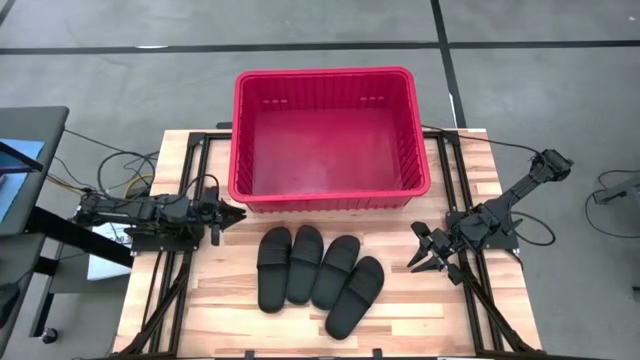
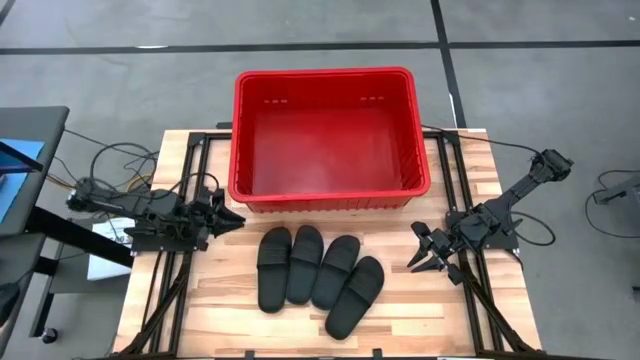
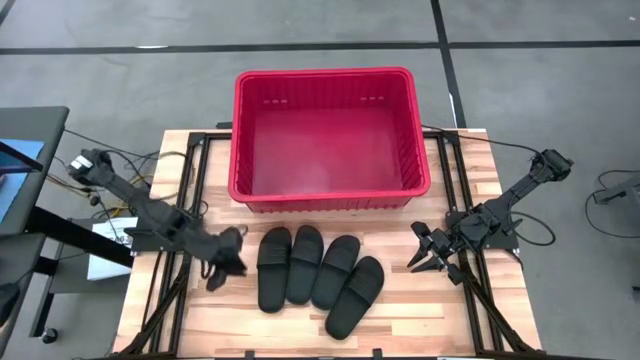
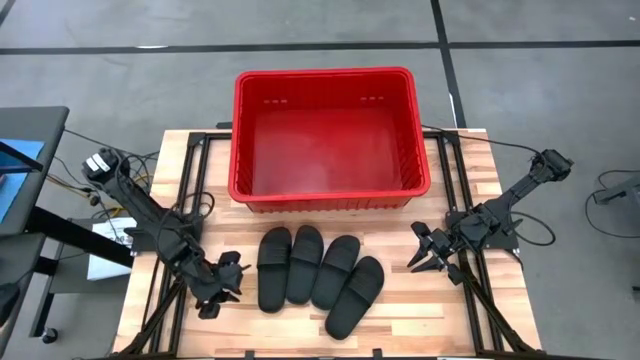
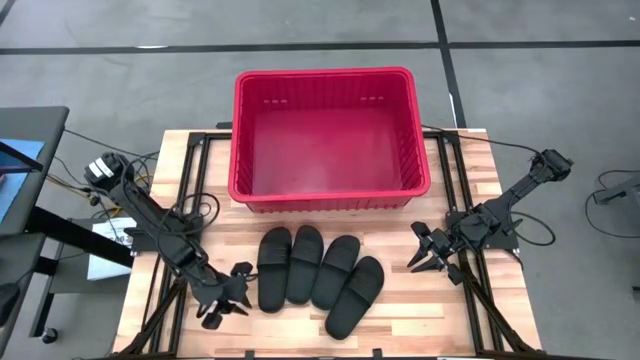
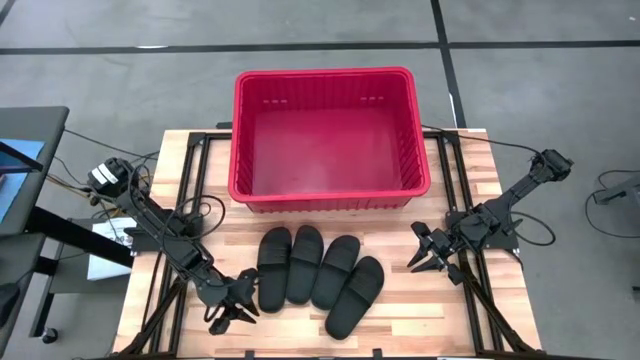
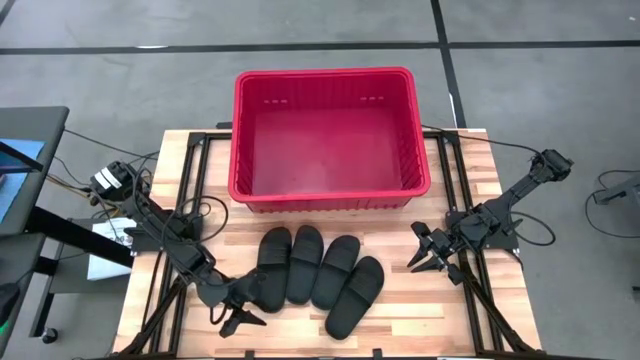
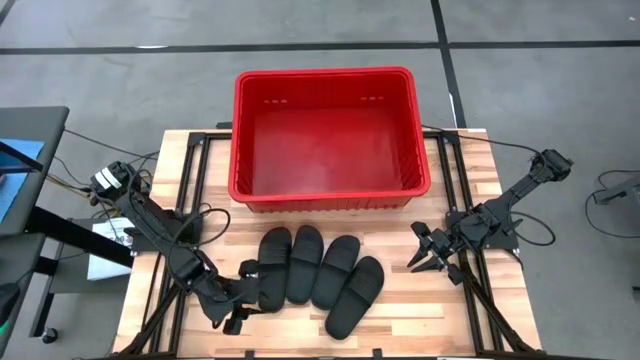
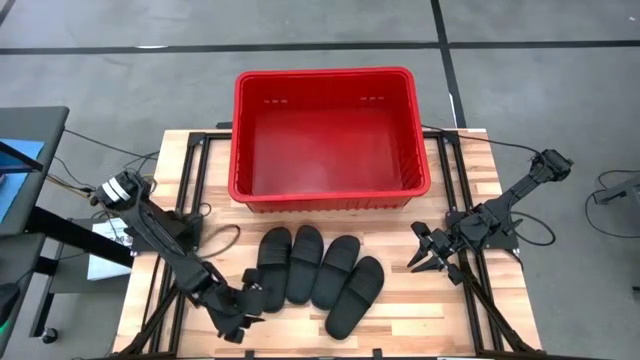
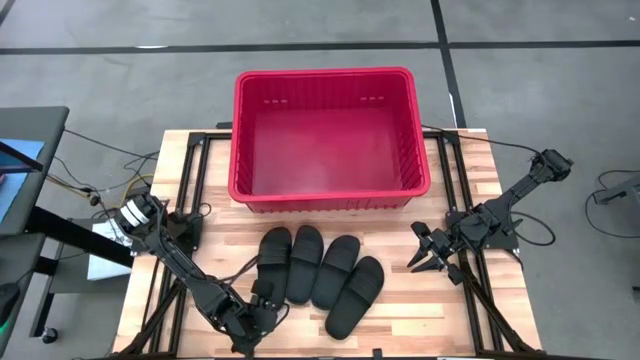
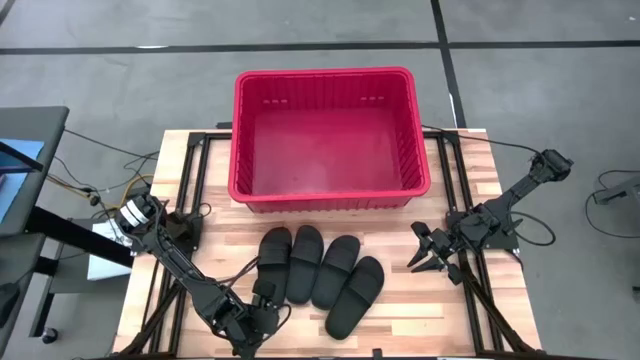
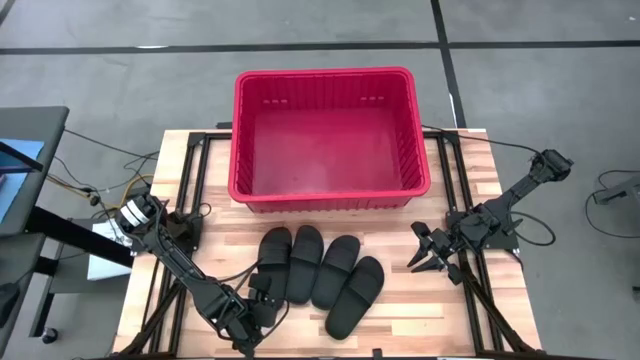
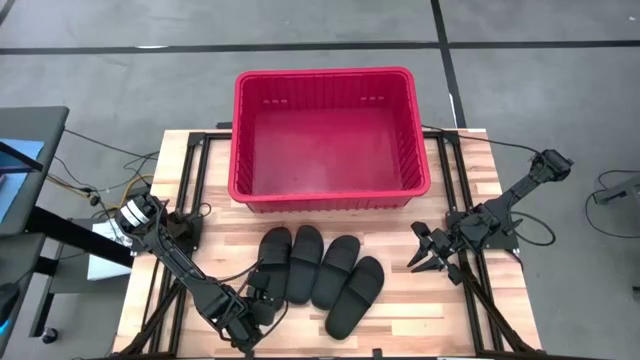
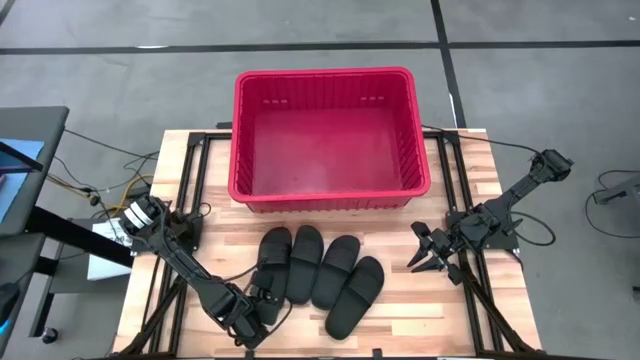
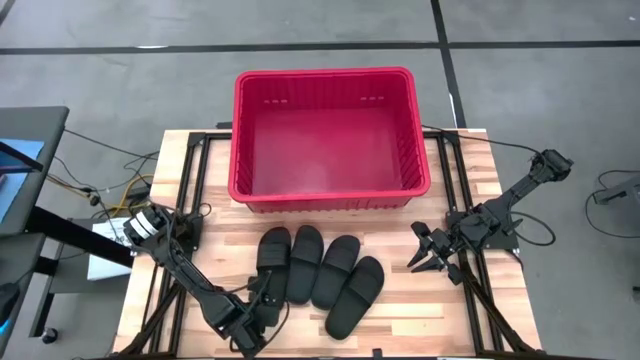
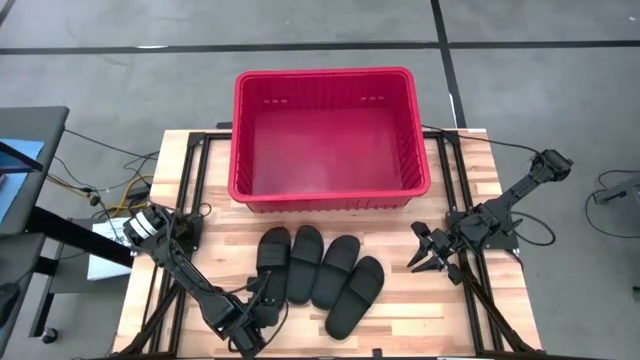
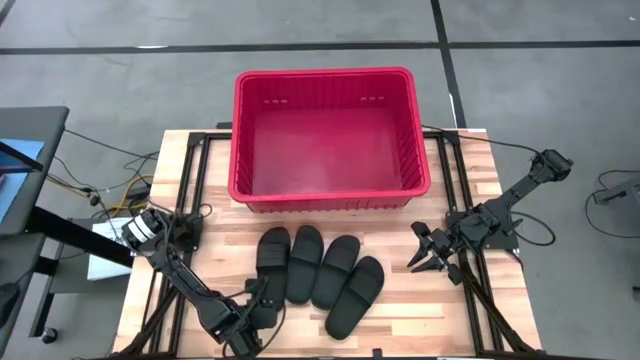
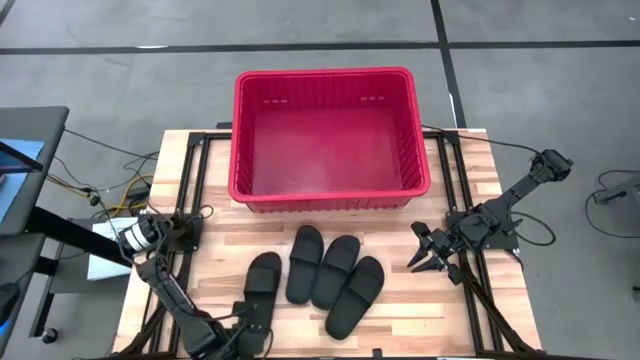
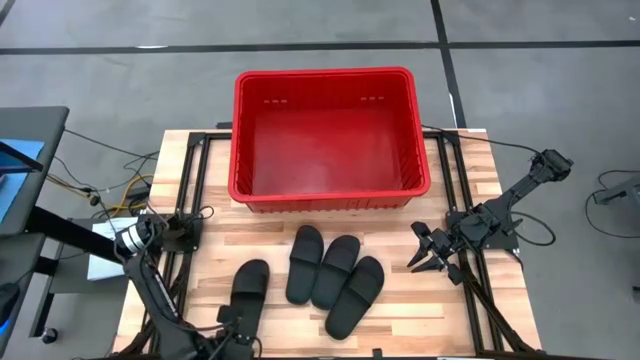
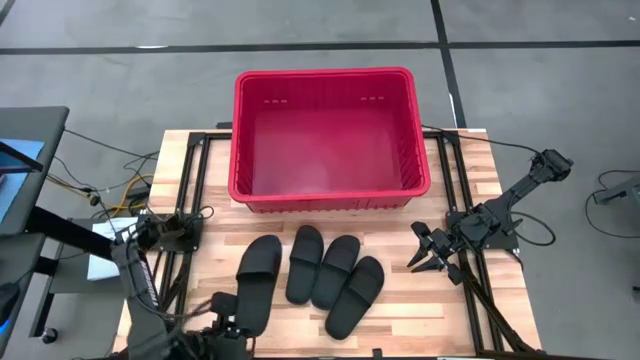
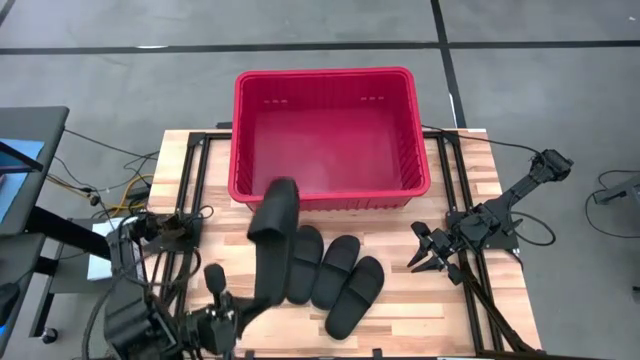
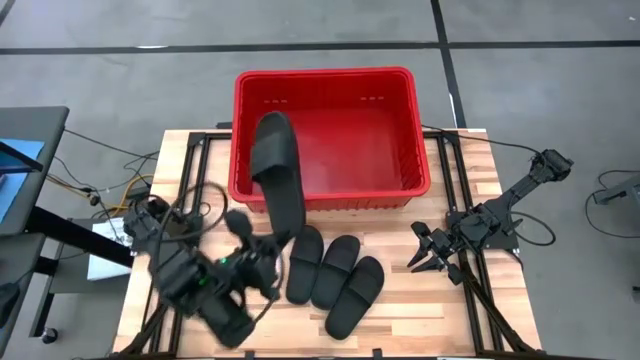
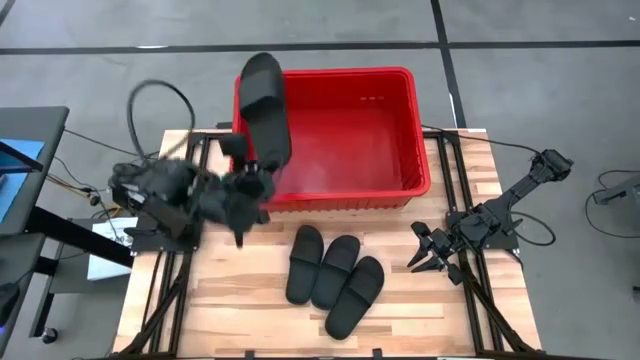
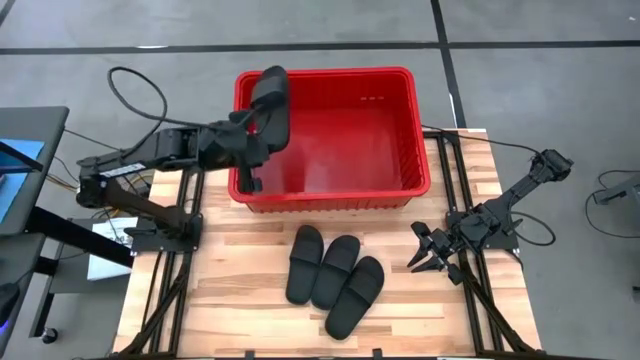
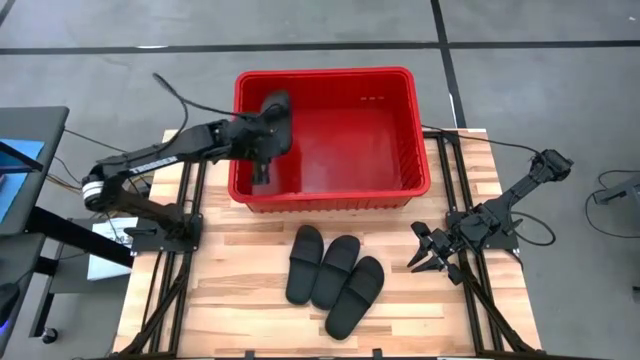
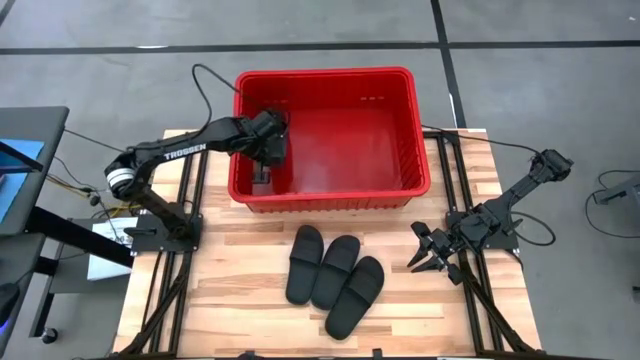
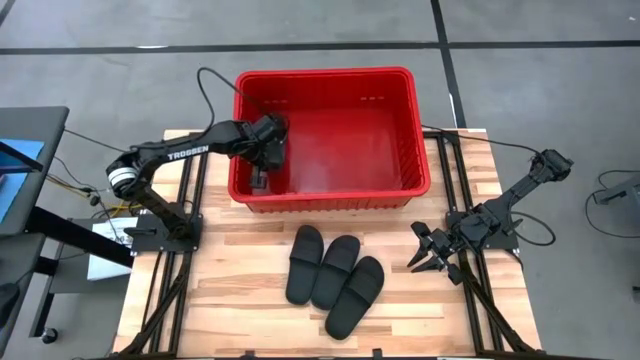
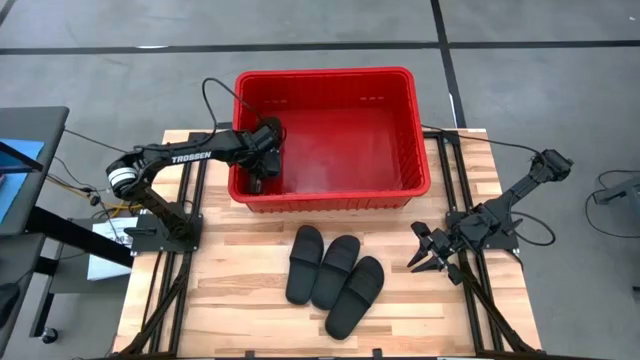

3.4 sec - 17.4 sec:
Task: Pick and place slides into bin
Put the black slide into the red container

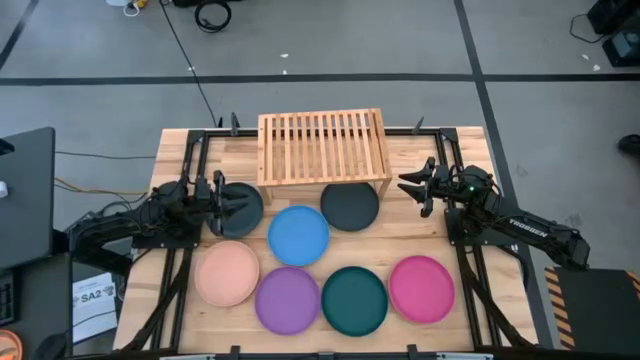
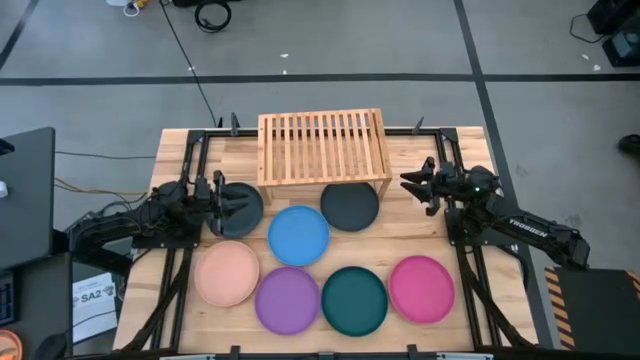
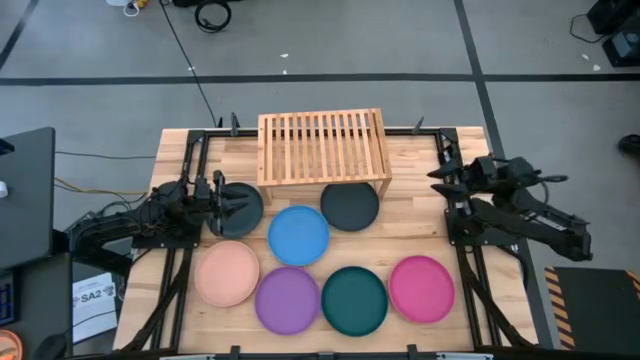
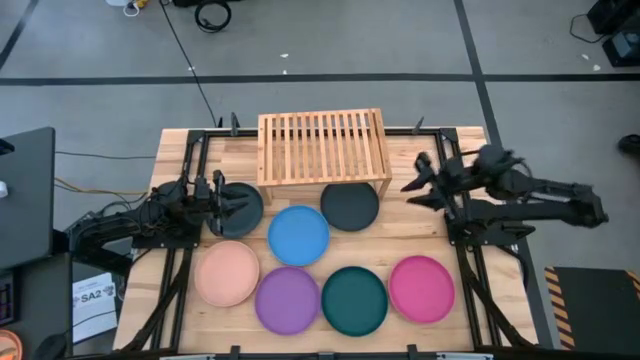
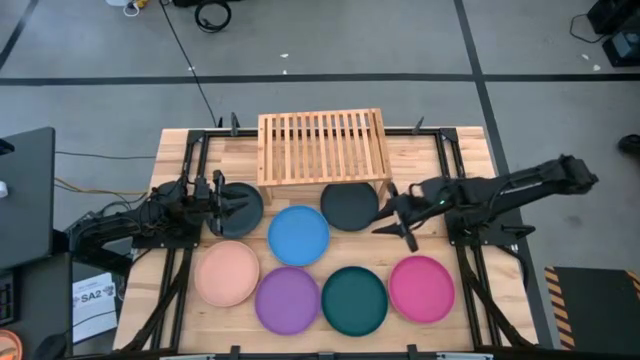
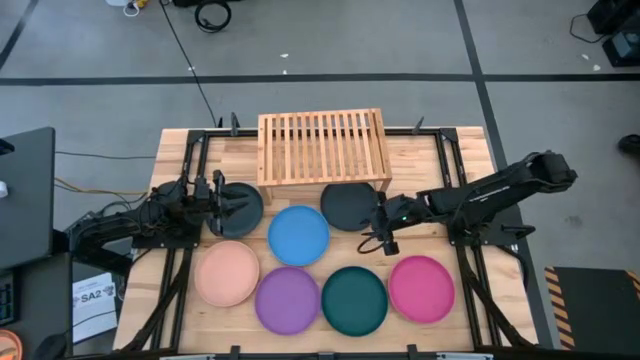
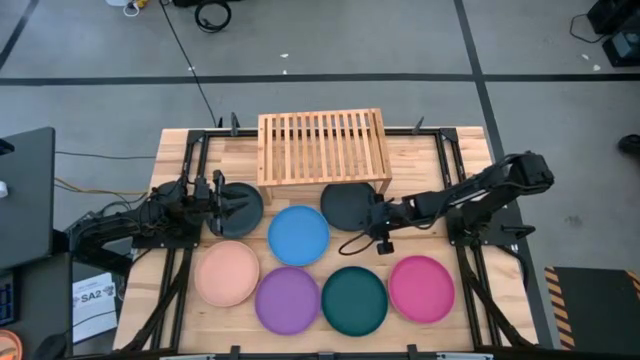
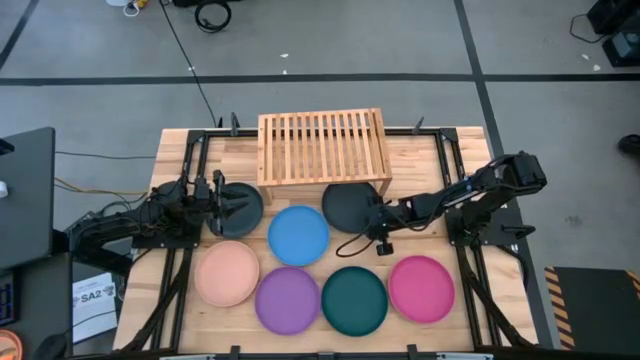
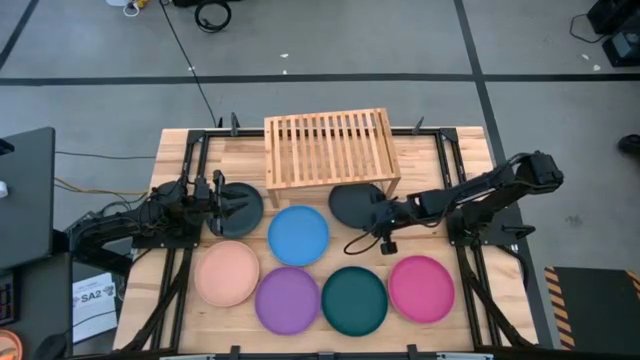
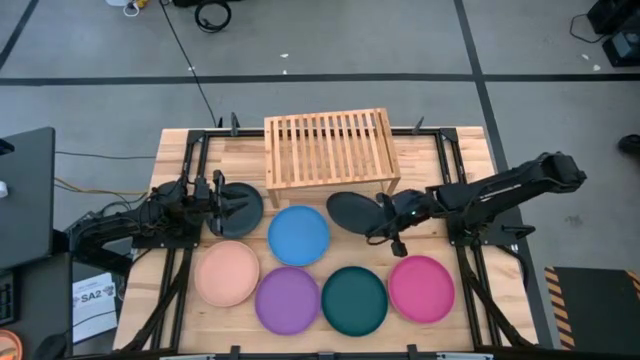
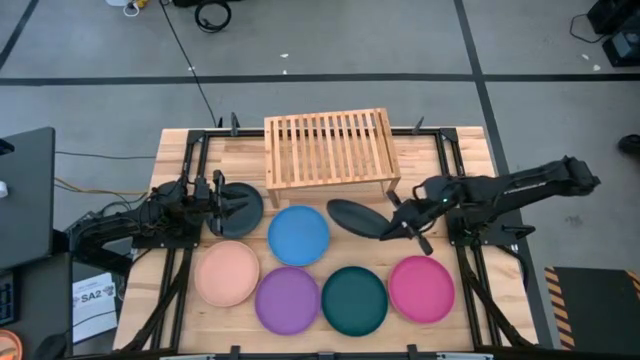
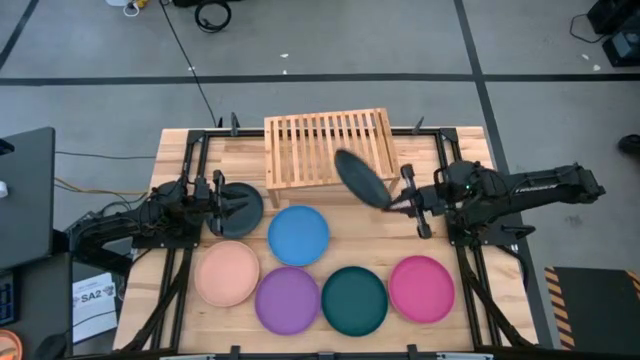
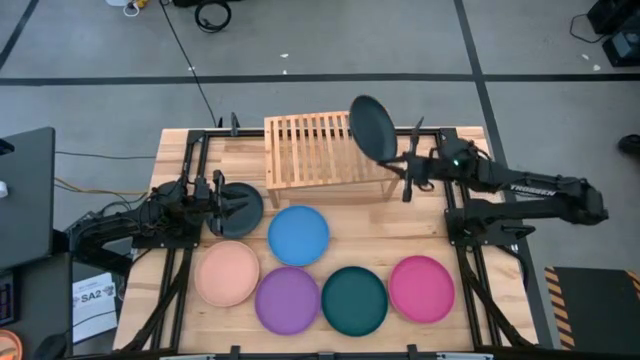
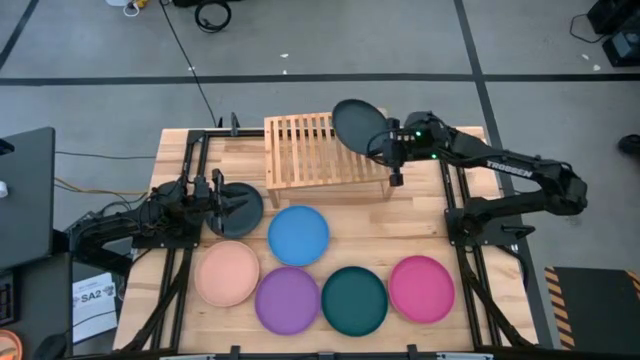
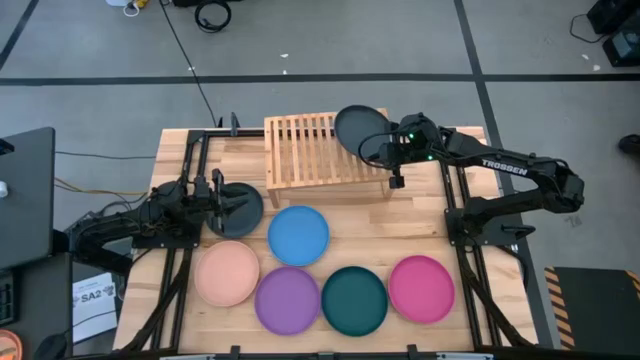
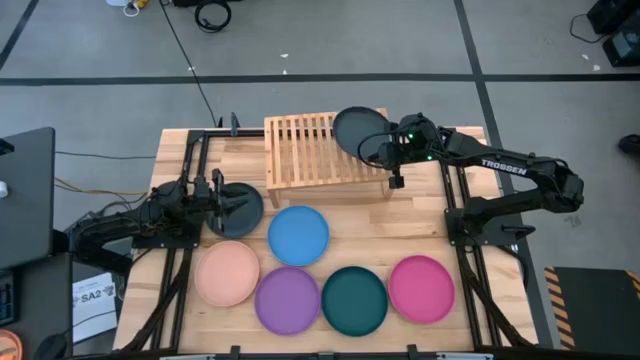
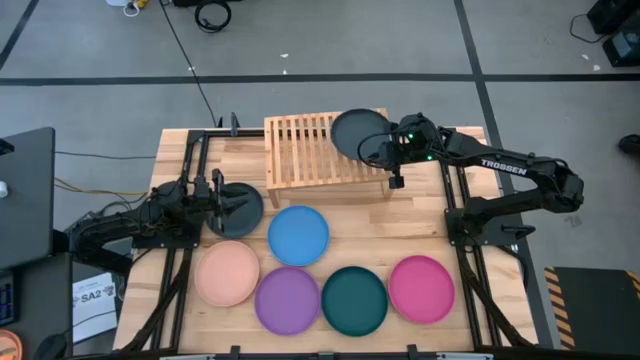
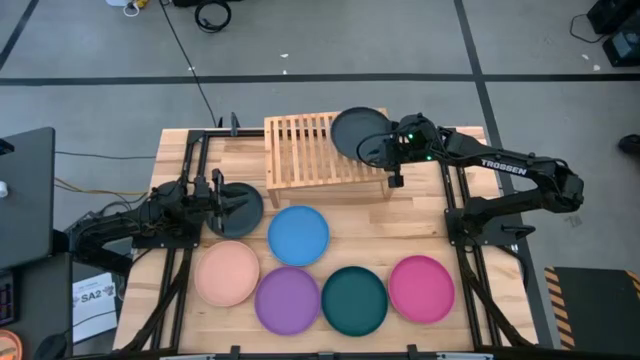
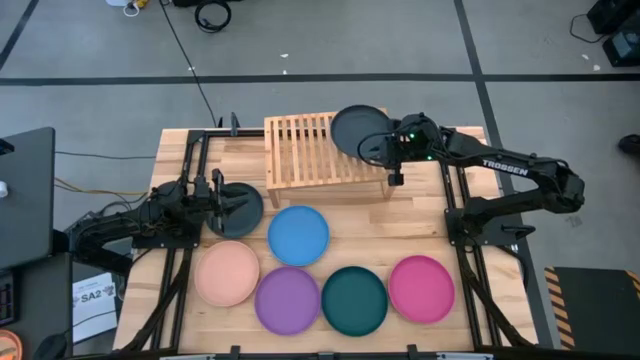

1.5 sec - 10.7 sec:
Task: Place and stack plates onto a shelf
Put the right black plate to the right on the shelf
